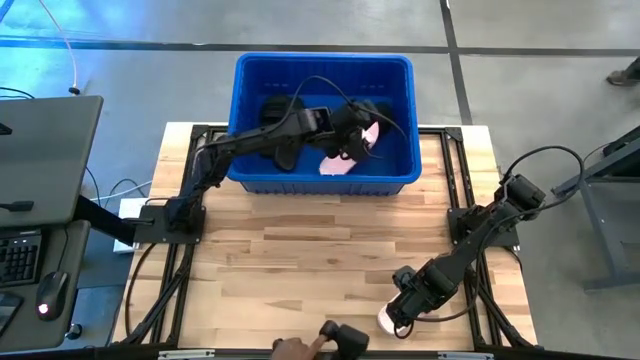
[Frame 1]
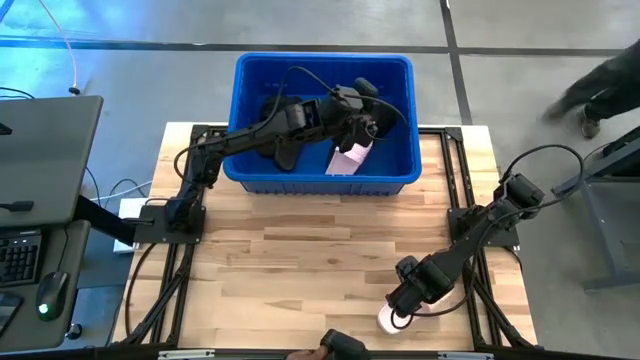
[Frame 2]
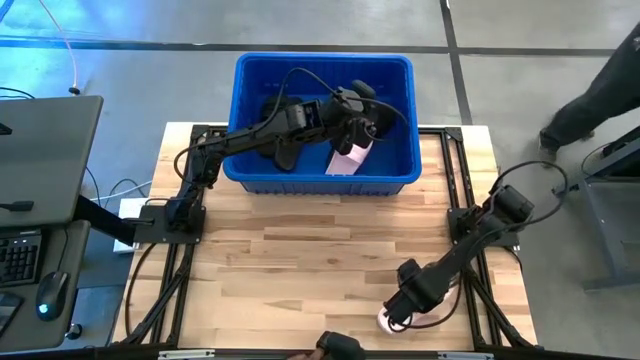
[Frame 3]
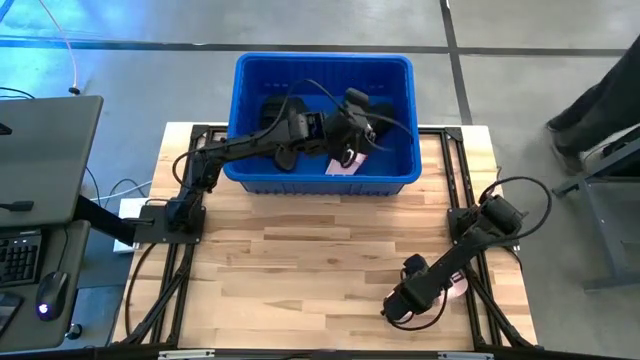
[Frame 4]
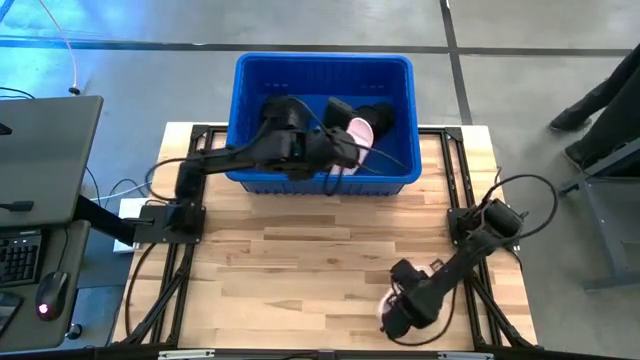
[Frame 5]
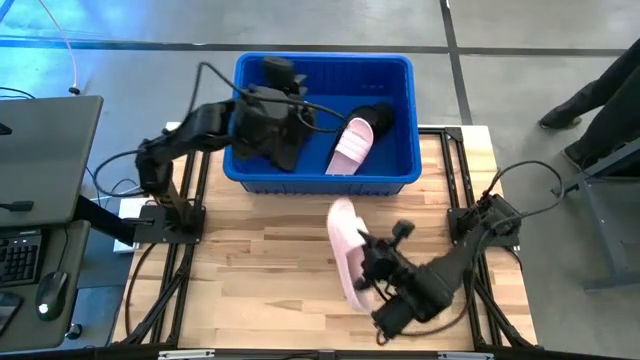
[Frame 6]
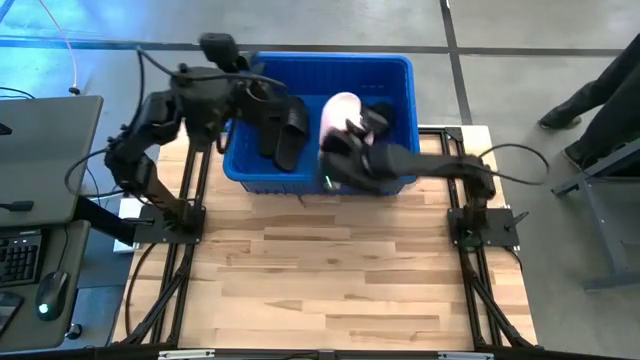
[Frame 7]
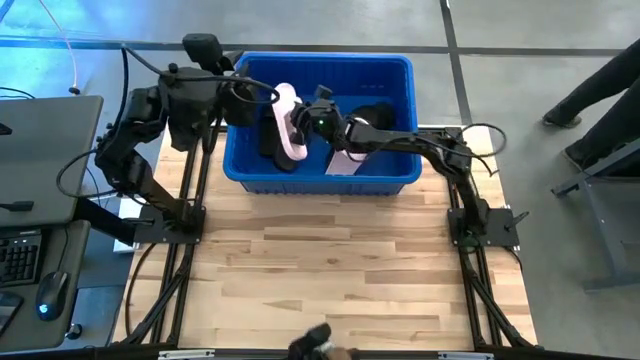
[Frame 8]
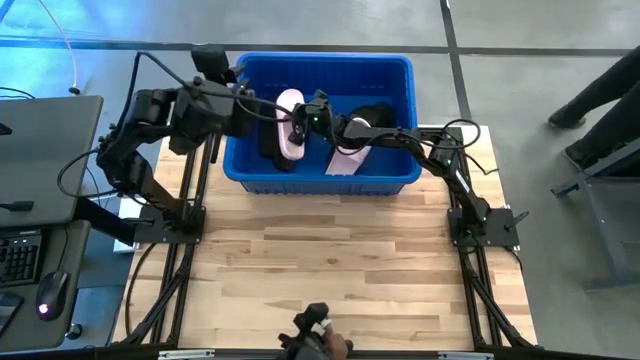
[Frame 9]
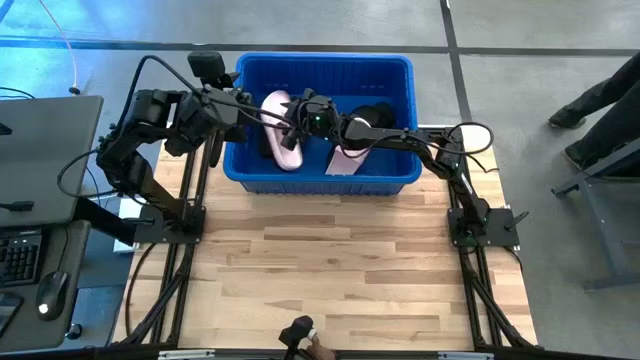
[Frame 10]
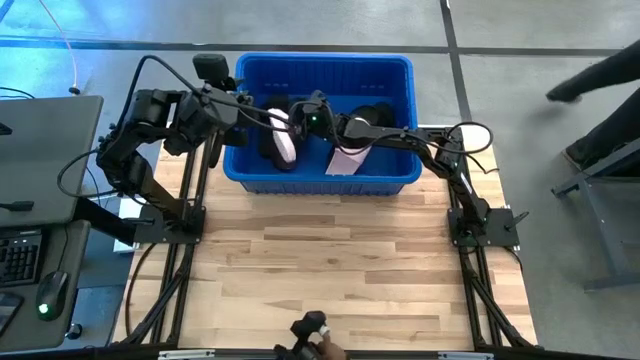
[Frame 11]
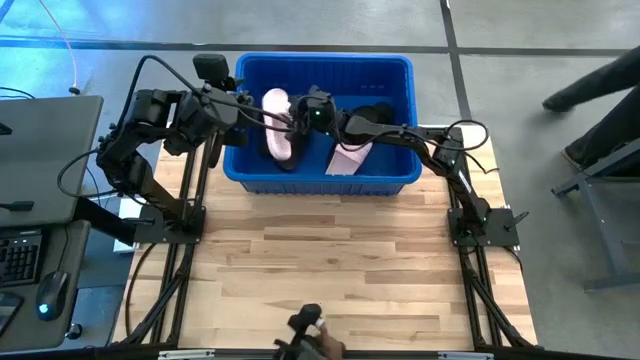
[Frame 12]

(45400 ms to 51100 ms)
Task: Pick and place slides into bin
Put the pink slide into the blue container

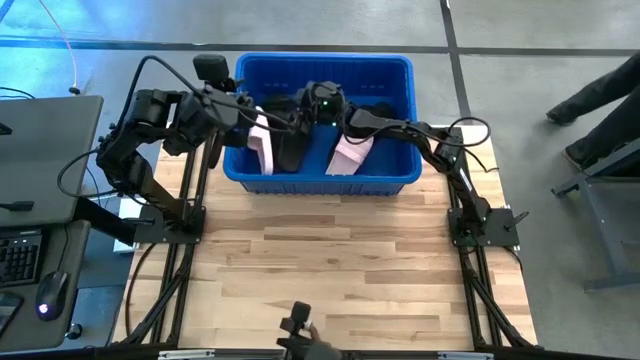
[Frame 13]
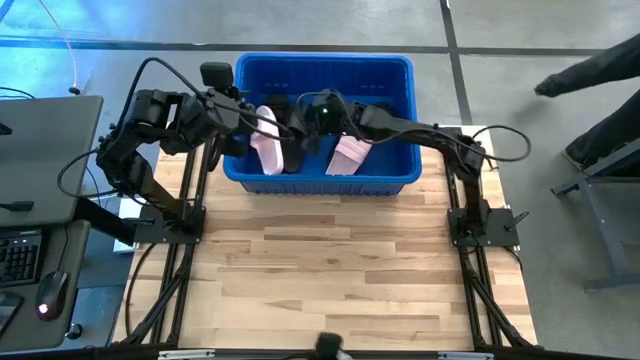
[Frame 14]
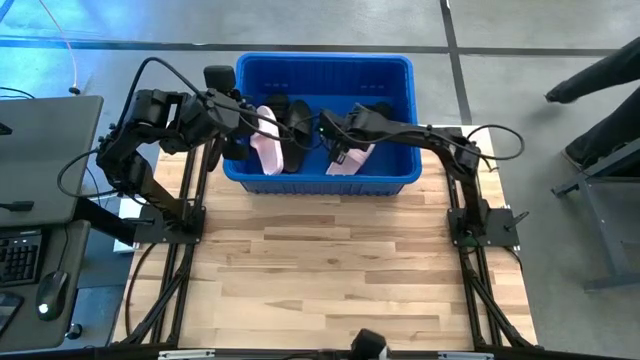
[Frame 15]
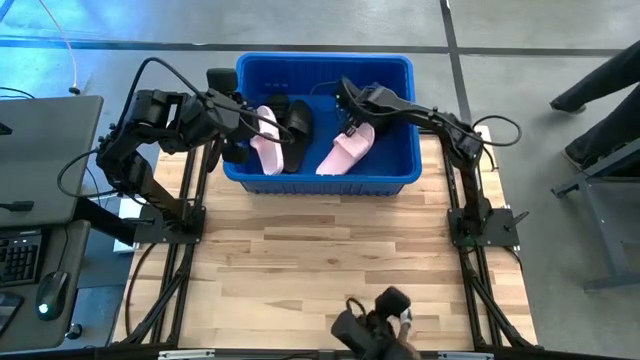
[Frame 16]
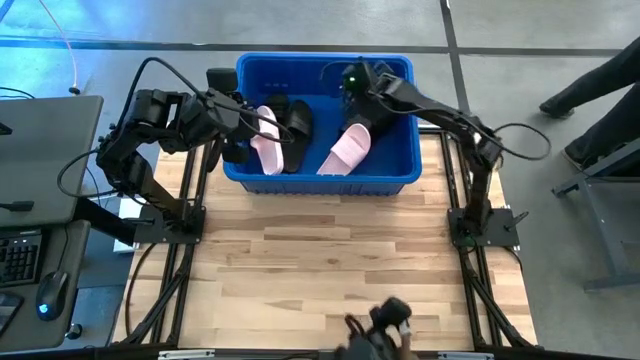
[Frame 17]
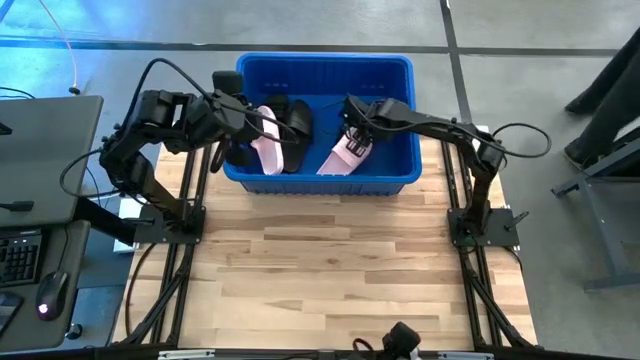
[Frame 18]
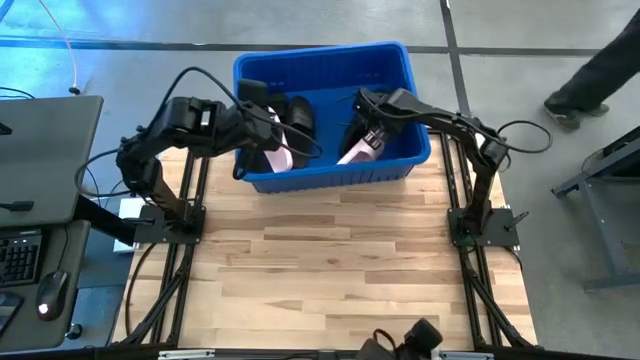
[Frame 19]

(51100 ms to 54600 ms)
Adjust the slides

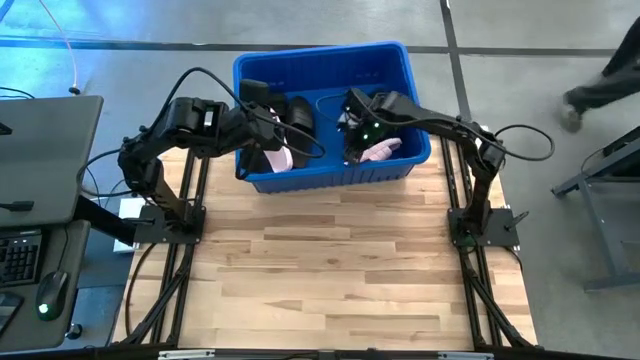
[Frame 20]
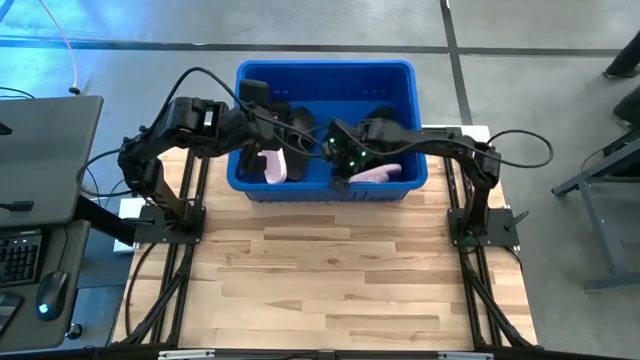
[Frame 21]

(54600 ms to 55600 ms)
Adjust the blue container

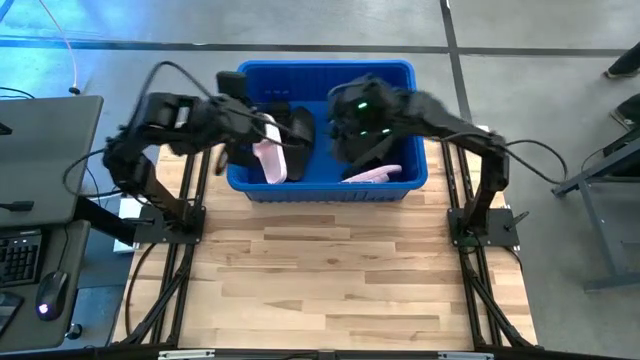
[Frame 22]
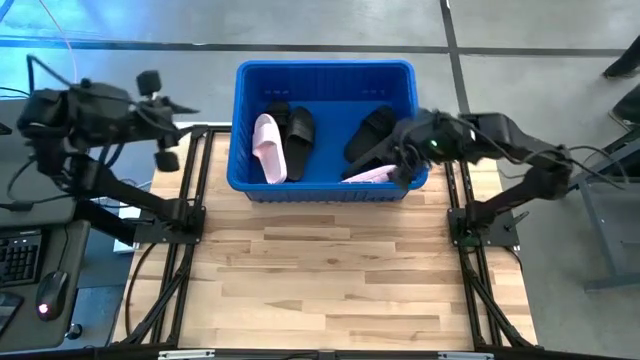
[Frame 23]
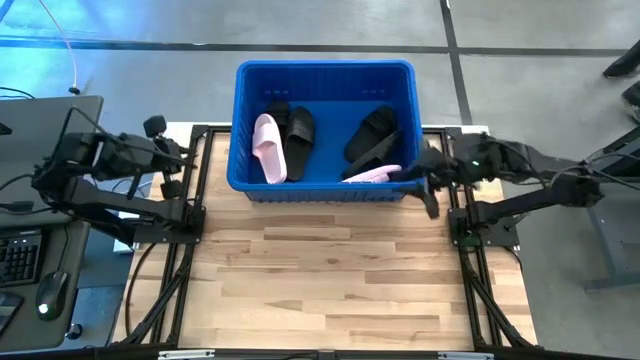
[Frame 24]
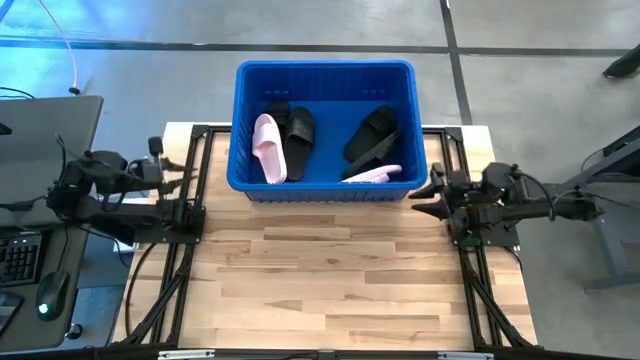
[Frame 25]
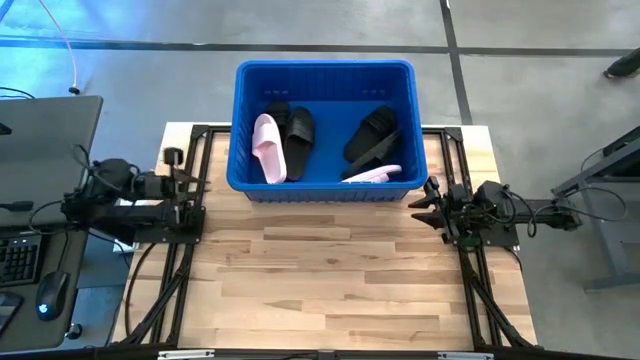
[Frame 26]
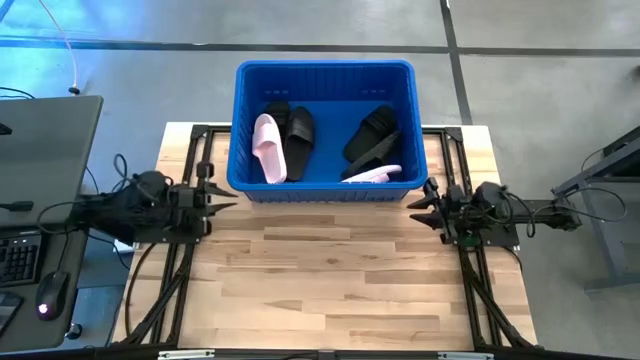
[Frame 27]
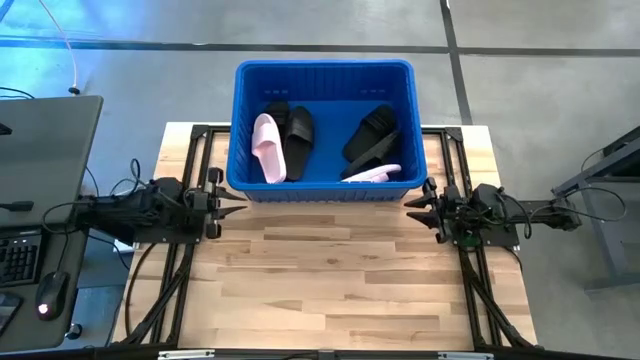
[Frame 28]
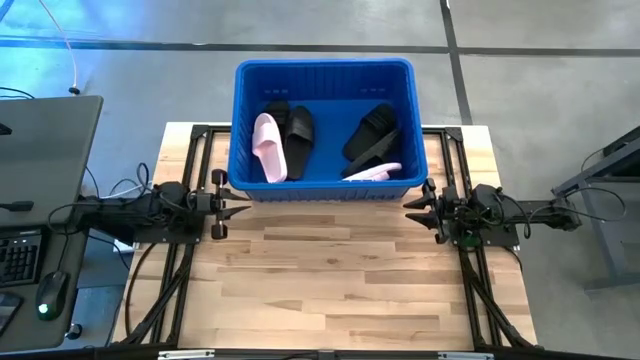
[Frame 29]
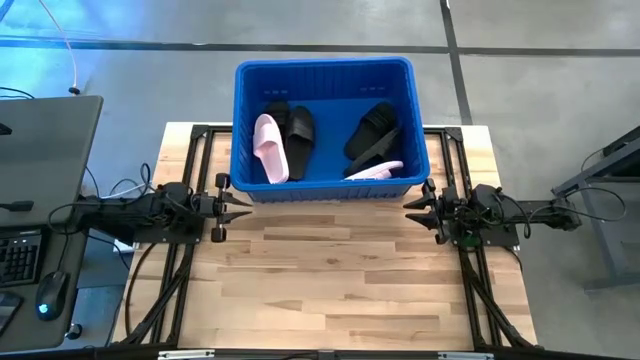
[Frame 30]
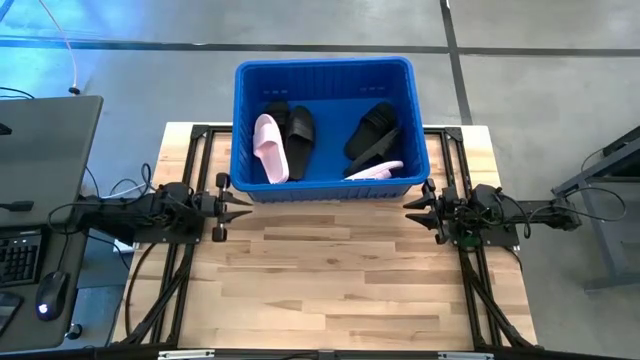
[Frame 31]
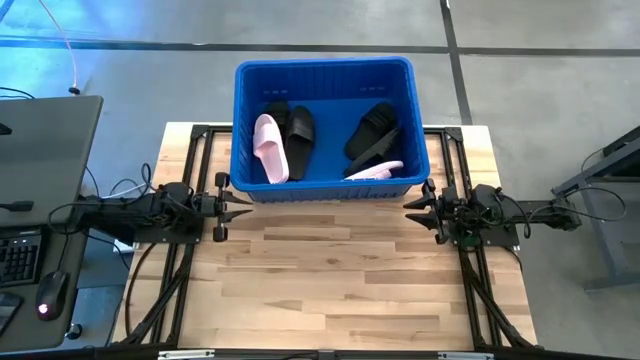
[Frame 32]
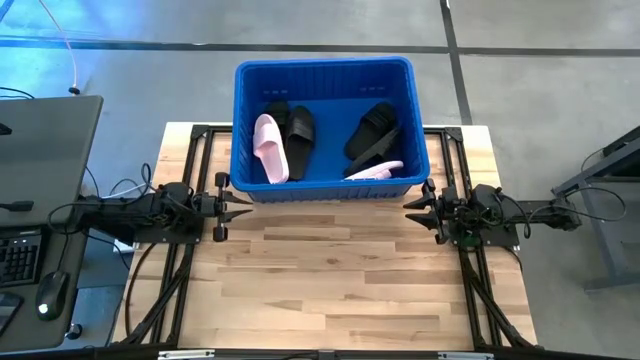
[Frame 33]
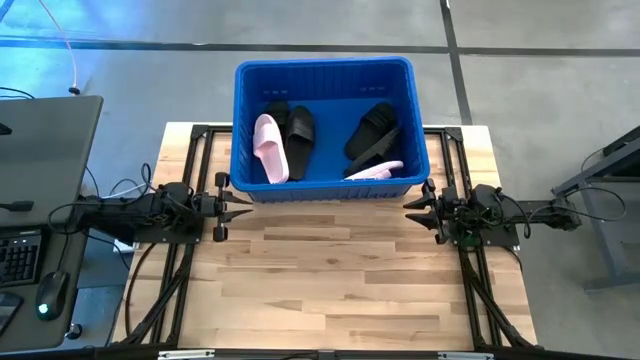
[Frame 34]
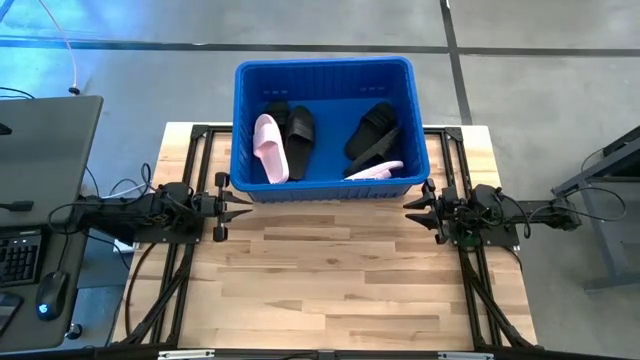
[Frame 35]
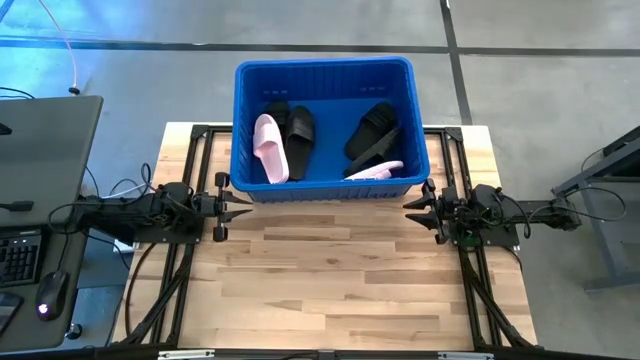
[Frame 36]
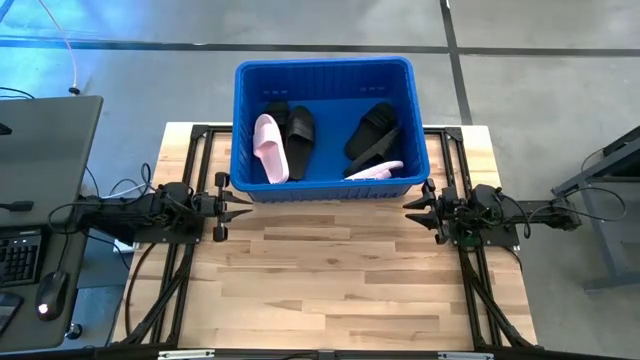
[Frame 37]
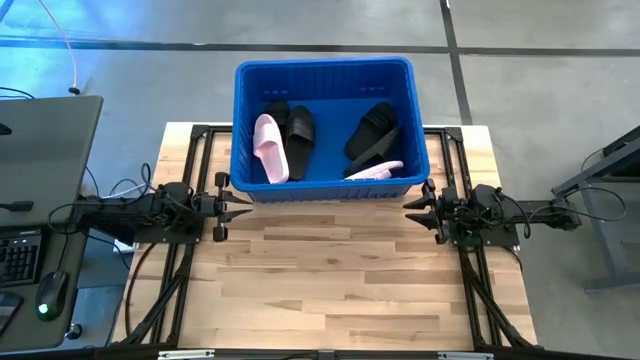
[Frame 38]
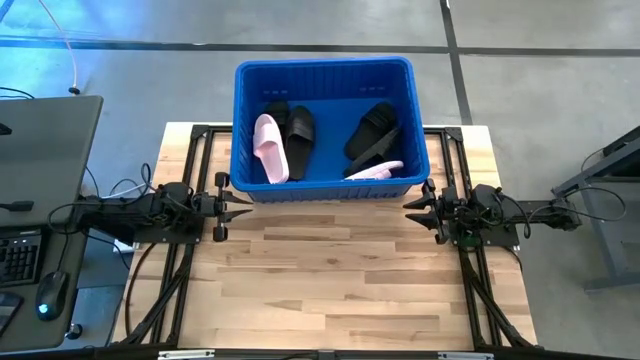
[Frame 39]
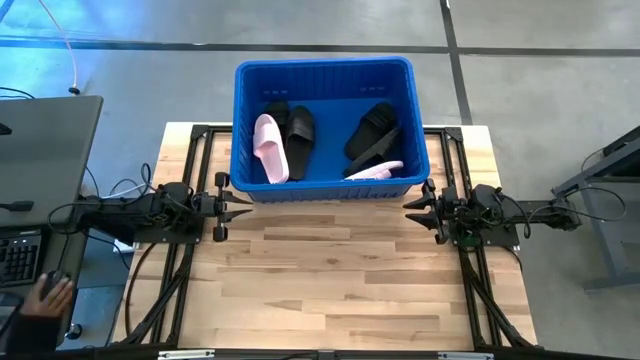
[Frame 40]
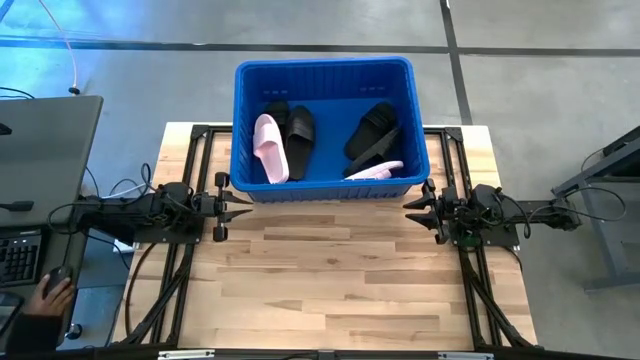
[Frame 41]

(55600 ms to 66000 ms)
Return to Home Position

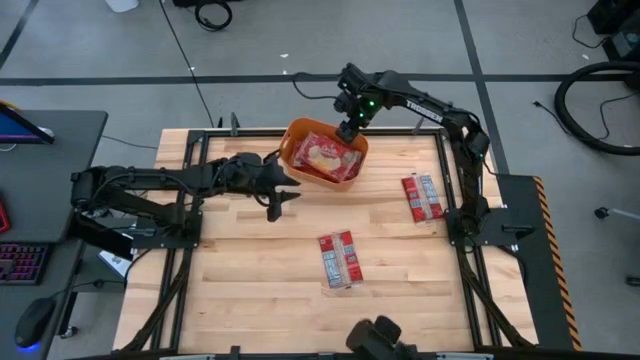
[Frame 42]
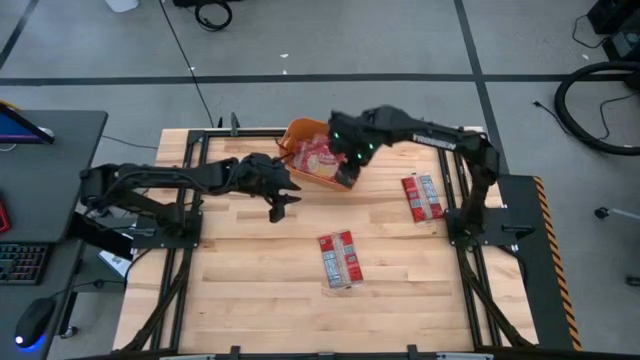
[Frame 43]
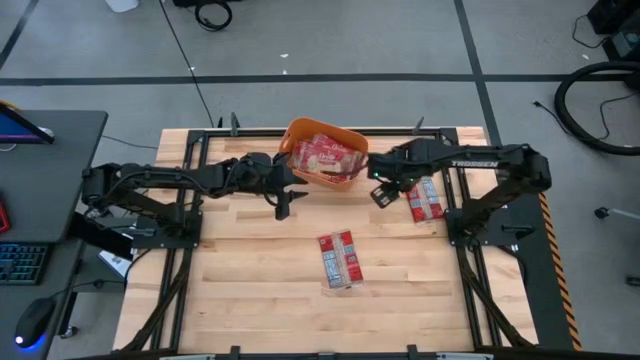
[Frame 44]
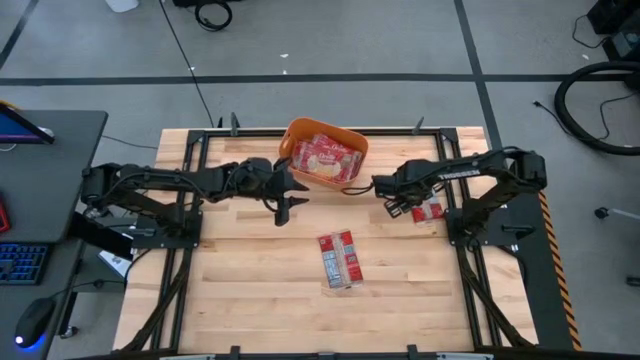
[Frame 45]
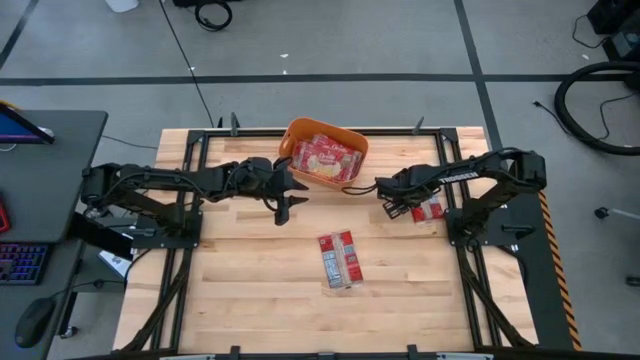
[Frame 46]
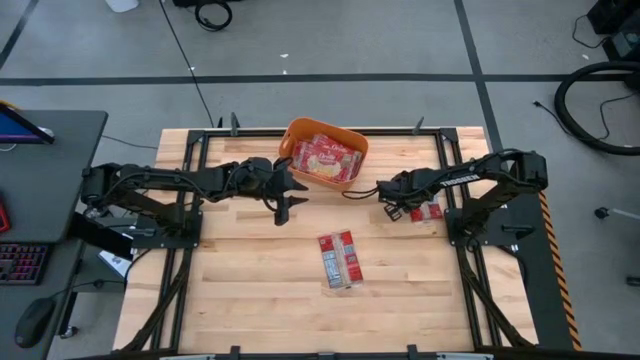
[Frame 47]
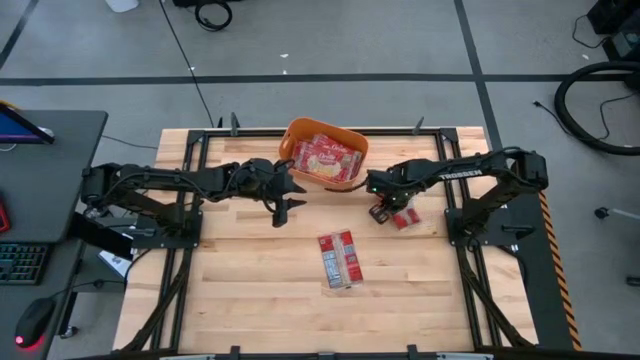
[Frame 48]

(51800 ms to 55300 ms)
Task: Sort popcorn bags into baskets
Move the red popcorn bag to the center of the table
